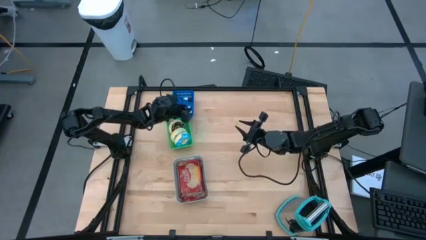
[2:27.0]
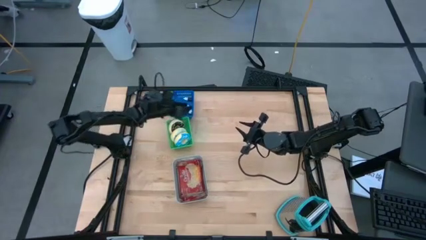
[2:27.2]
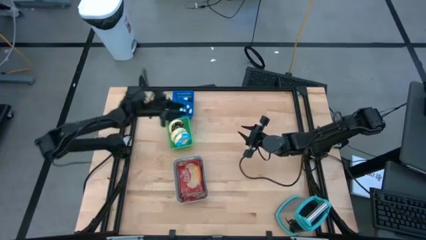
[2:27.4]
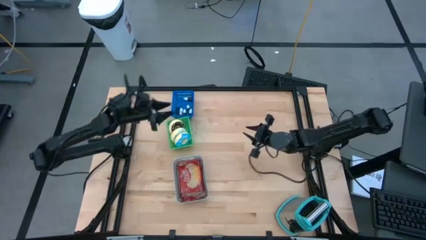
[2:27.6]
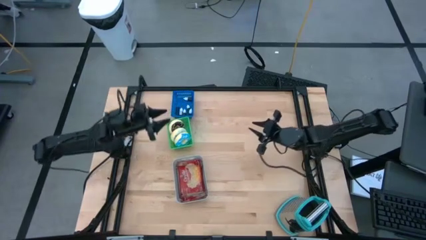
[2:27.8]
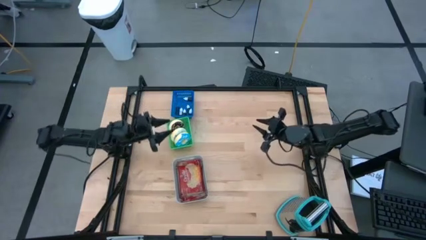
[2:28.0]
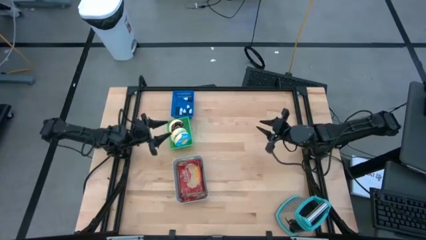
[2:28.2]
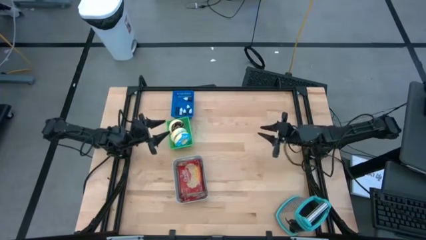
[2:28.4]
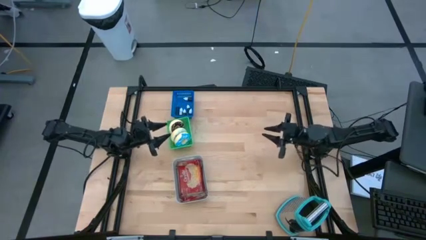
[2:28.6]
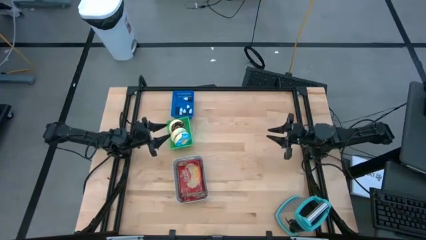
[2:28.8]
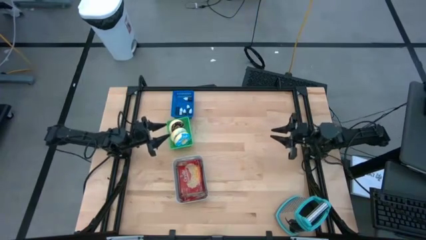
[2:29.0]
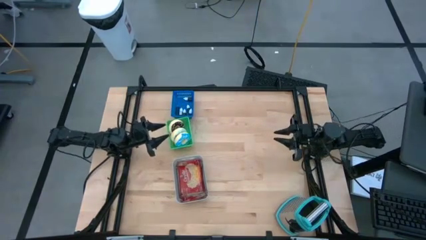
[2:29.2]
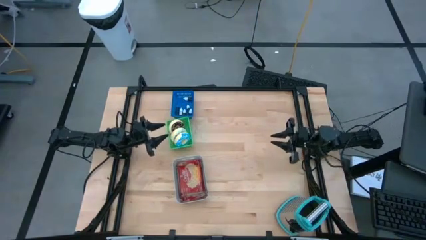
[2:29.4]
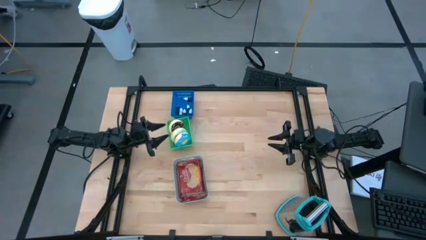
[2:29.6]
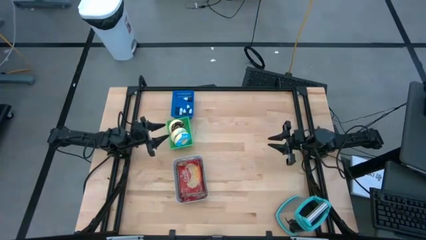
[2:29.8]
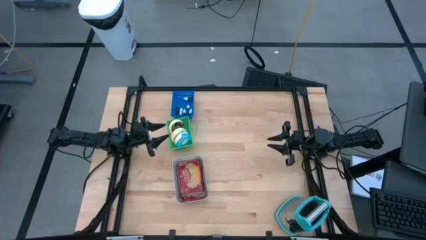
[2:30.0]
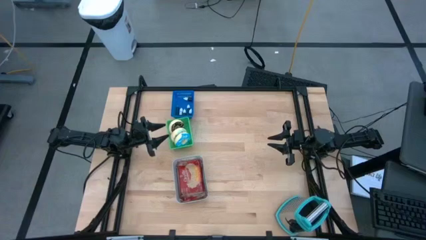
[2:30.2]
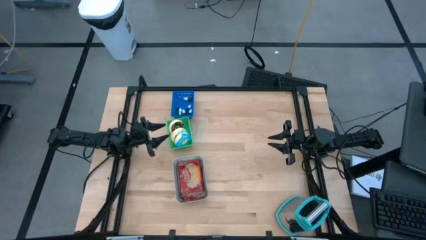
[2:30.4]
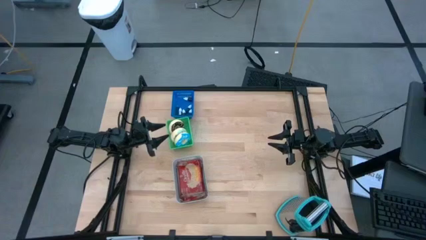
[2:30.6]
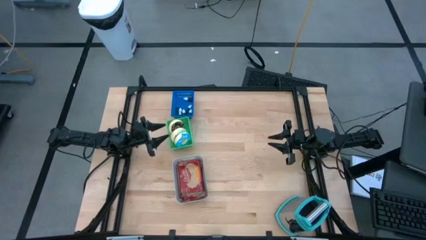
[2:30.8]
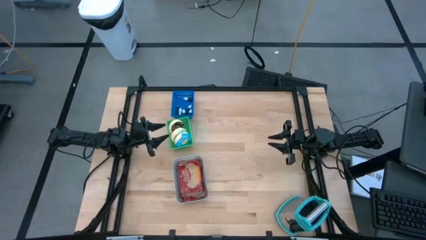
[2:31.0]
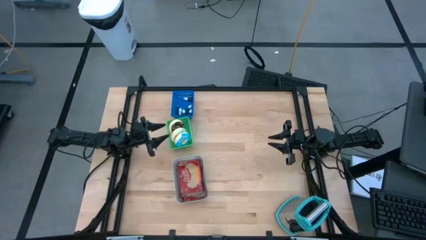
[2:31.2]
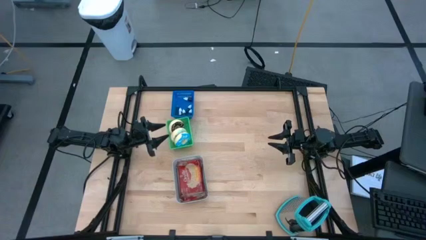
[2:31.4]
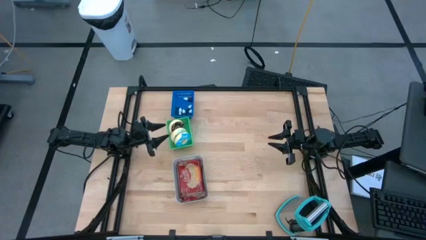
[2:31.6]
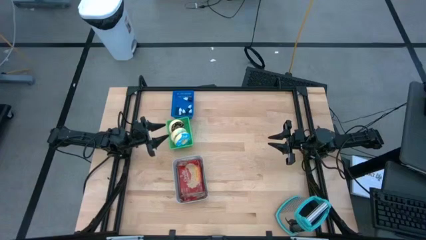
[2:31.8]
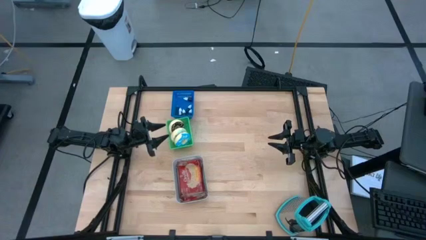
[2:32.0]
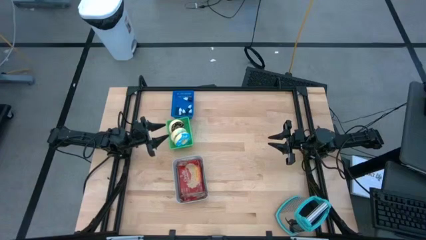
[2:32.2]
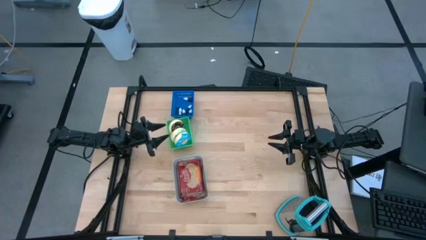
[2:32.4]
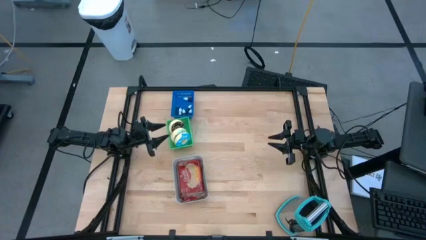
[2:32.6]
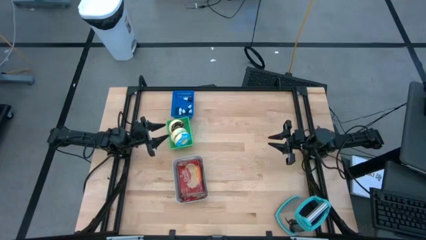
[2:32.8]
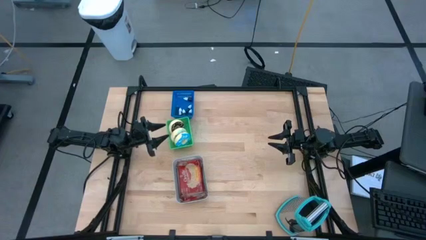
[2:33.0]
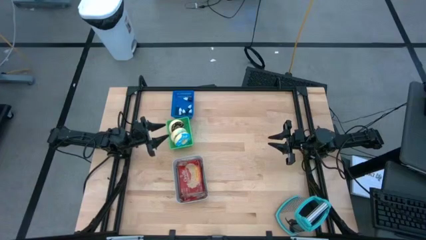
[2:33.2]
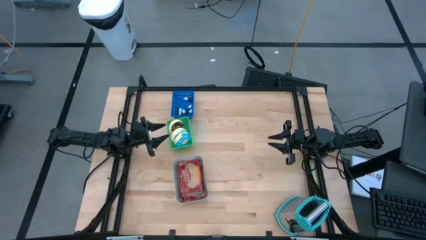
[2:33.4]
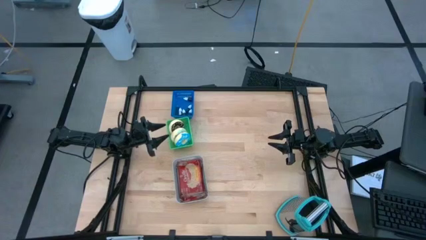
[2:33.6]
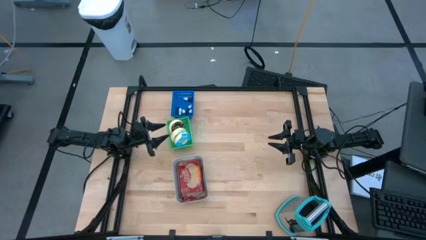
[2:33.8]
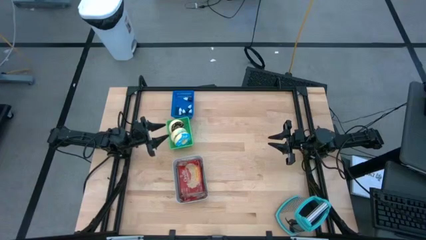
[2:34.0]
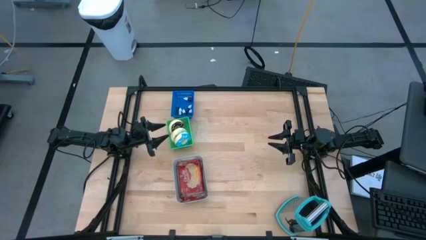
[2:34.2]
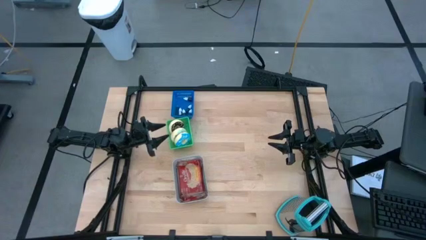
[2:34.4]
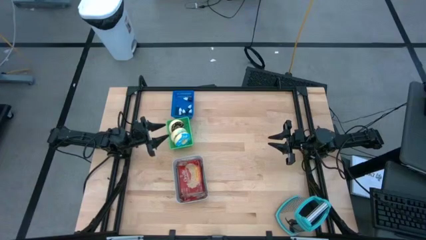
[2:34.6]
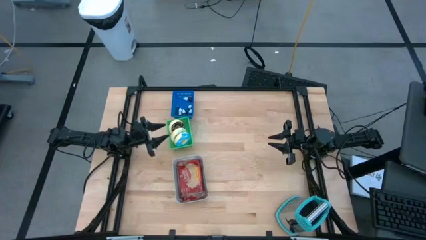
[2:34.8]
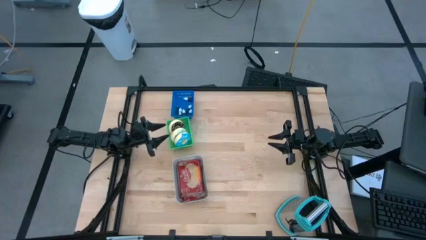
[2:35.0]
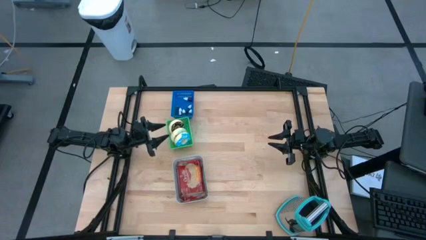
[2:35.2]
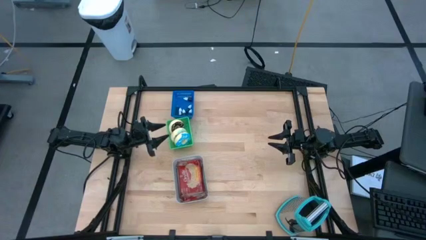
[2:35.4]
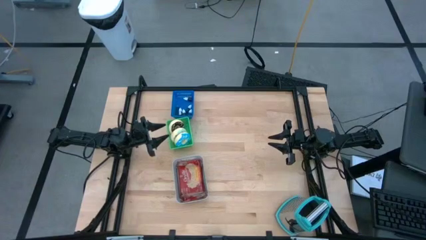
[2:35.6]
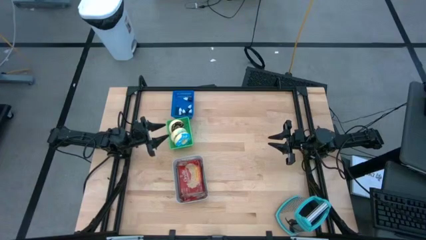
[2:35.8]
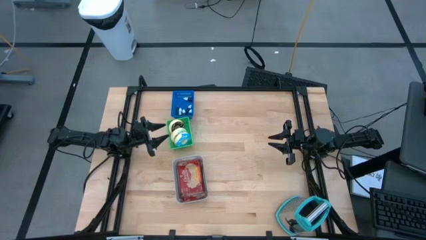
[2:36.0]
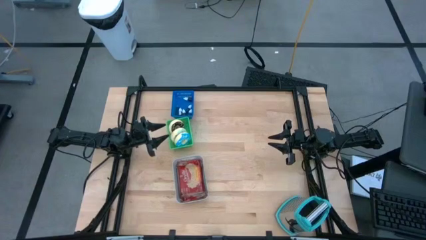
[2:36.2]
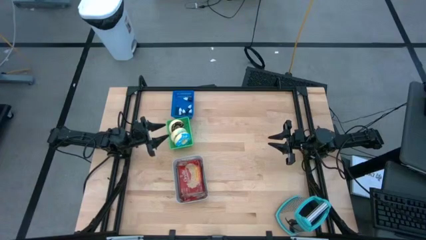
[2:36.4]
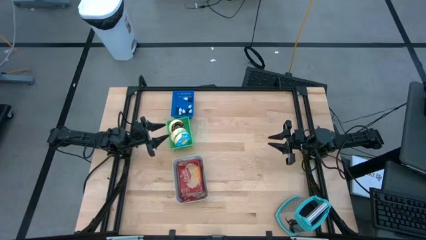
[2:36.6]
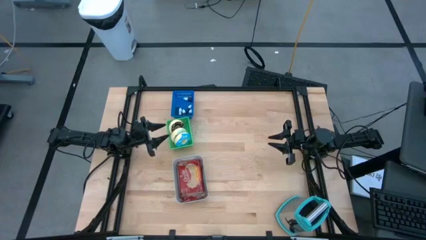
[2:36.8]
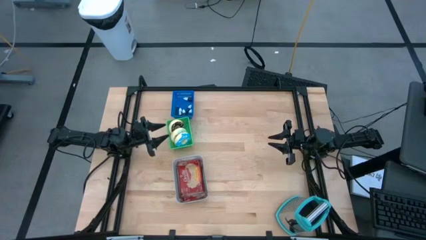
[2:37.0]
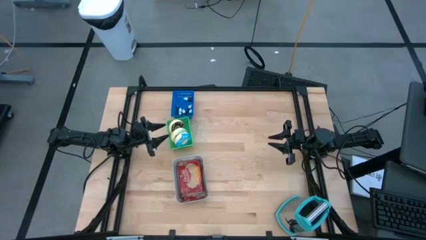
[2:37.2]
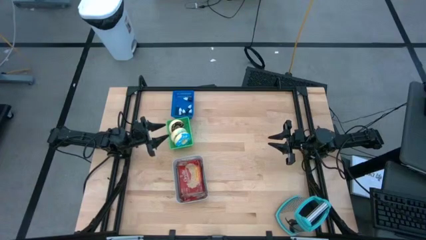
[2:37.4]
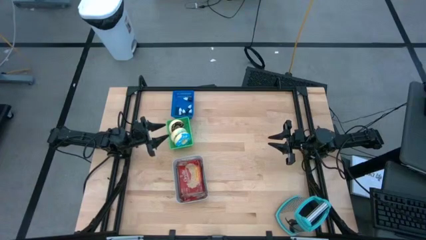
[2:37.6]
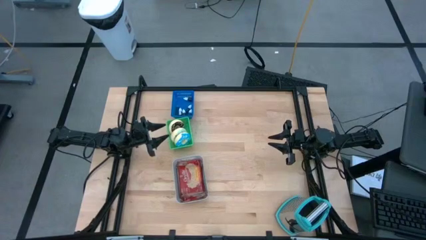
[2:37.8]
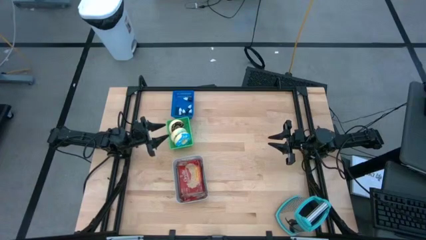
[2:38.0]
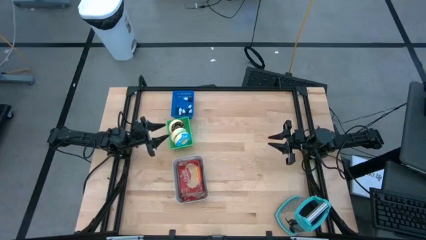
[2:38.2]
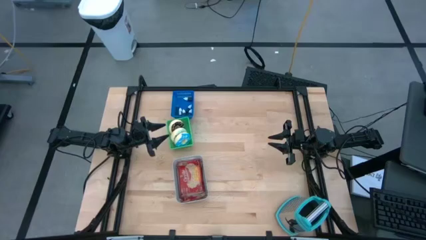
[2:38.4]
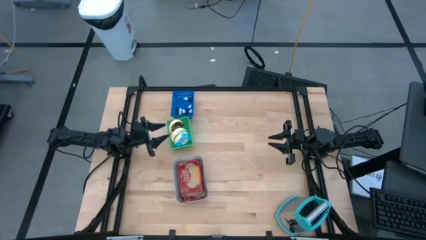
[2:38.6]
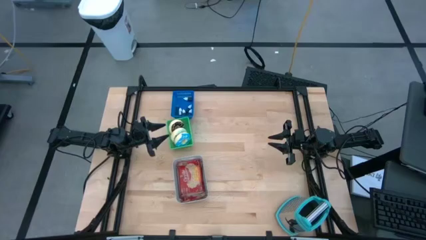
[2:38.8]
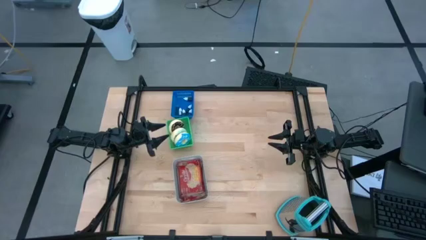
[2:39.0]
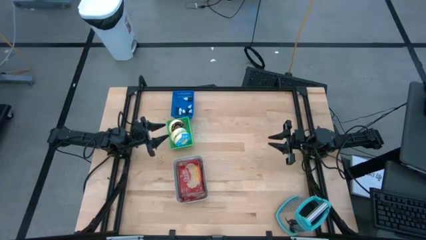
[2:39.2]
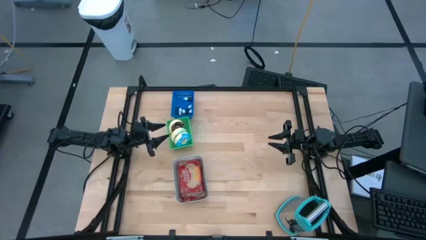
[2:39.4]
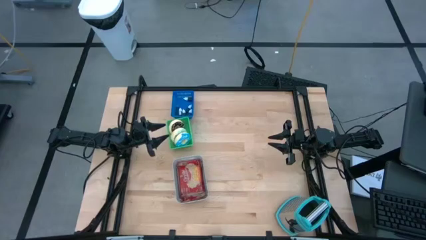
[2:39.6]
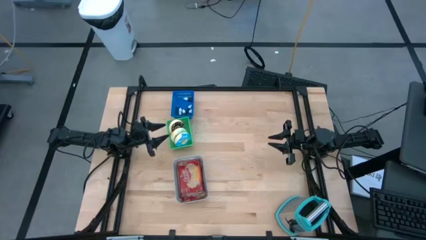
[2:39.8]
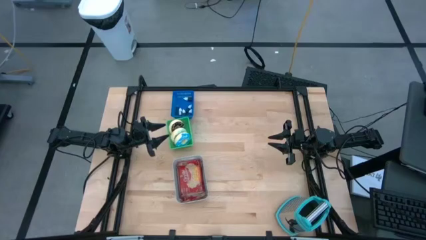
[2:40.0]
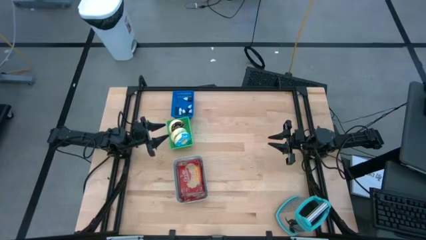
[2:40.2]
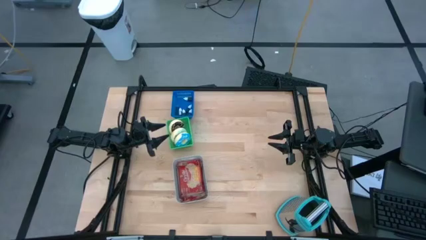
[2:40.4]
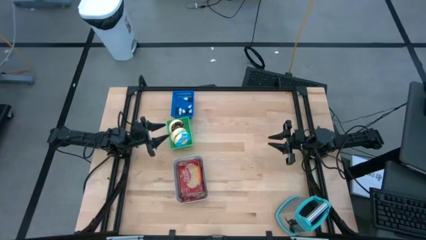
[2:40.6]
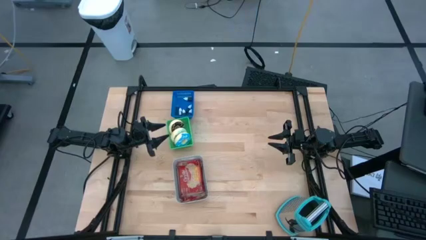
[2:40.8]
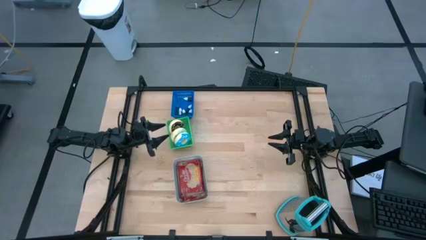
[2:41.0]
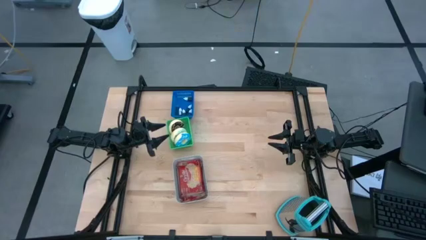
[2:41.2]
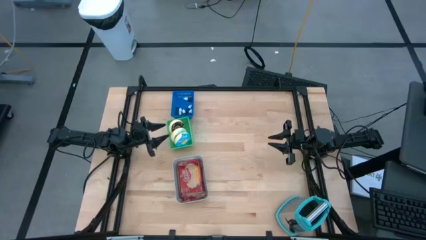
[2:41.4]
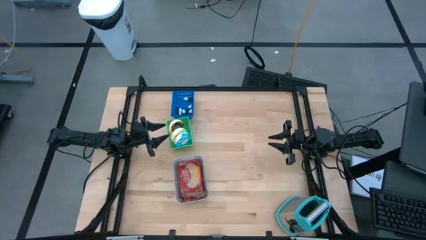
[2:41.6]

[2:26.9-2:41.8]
Task: Pick & Place Food Item
Return to Home Position

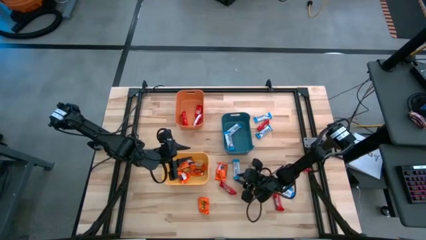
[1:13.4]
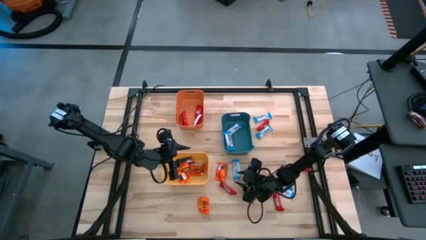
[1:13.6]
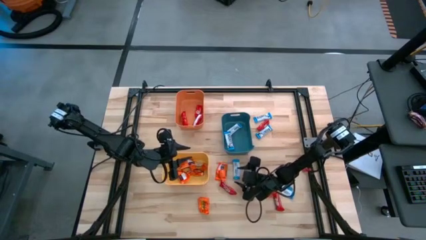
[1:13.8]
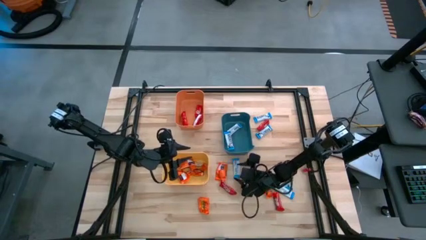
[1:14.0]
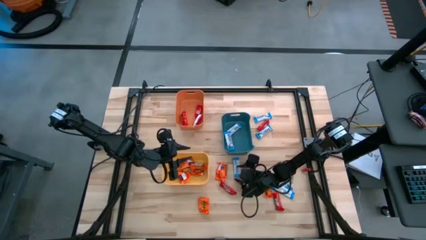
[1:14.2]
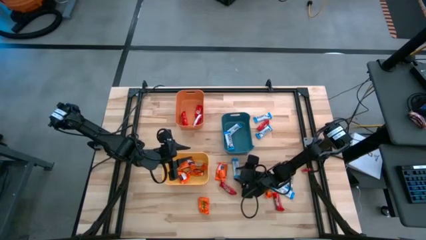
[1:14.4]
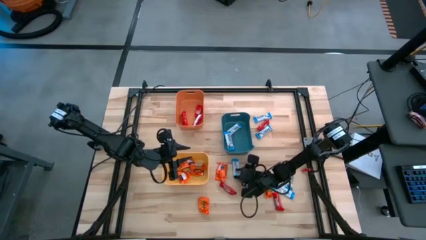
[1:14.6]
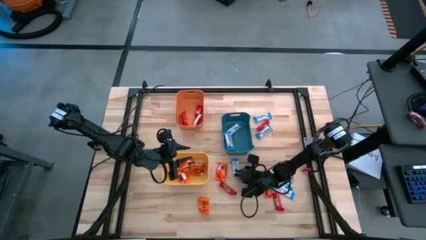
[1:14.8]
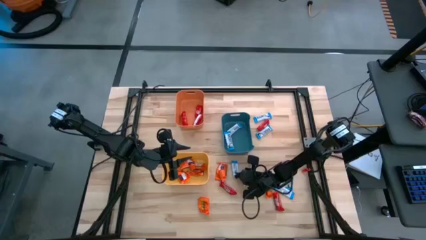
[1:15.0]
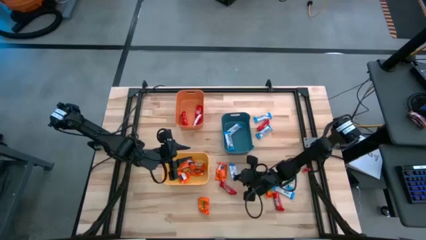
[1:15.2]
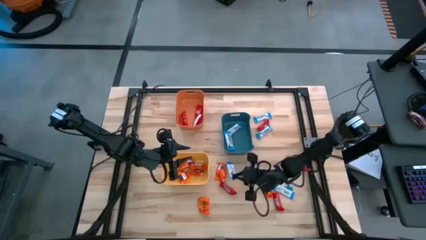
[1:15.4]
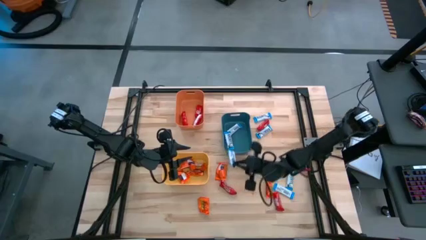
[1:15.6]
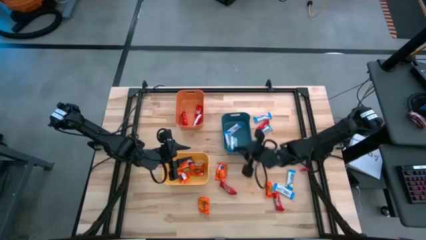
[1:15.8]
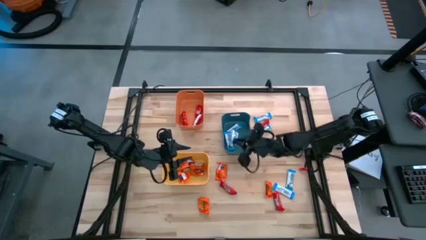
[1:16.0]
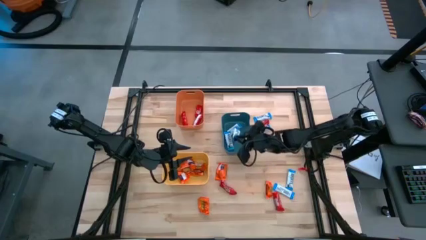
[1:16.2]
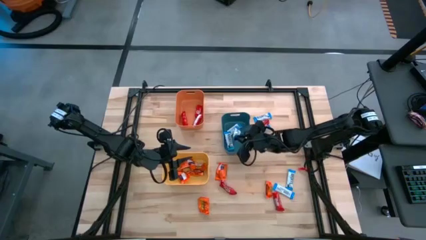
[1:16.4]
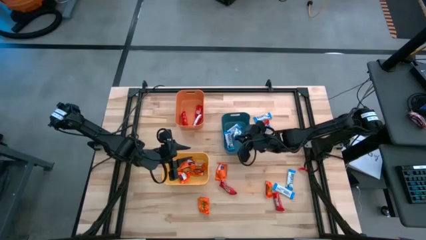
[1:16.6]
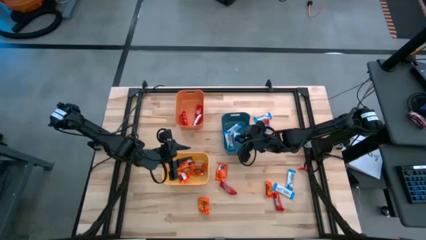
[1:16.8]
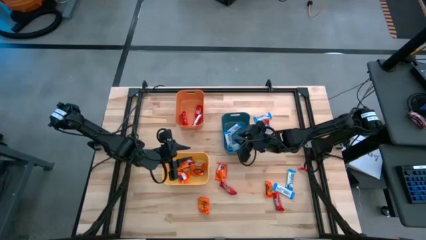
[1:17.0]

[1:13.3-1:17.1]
Task: Organize candy in baskets
Put the white chocolate into the blue bin
